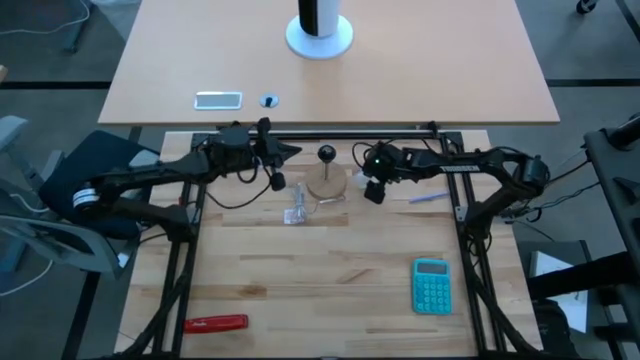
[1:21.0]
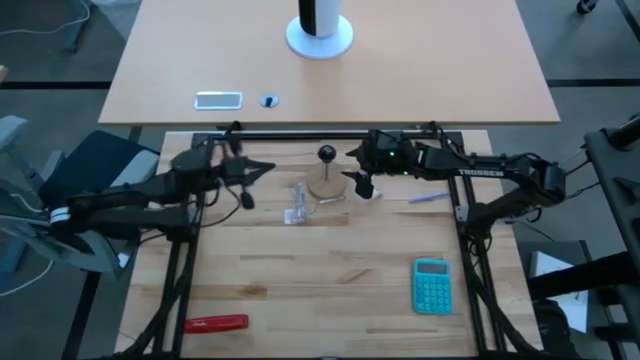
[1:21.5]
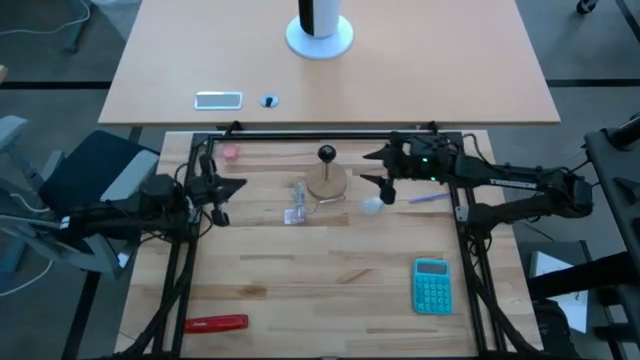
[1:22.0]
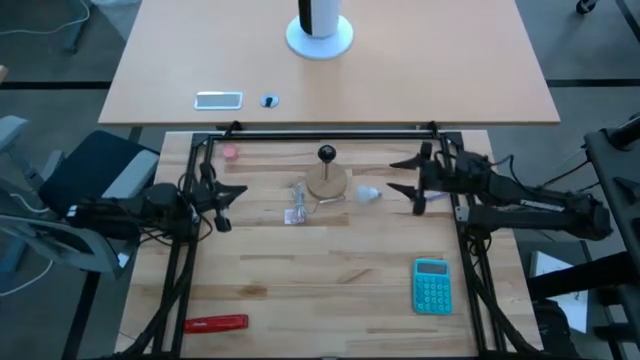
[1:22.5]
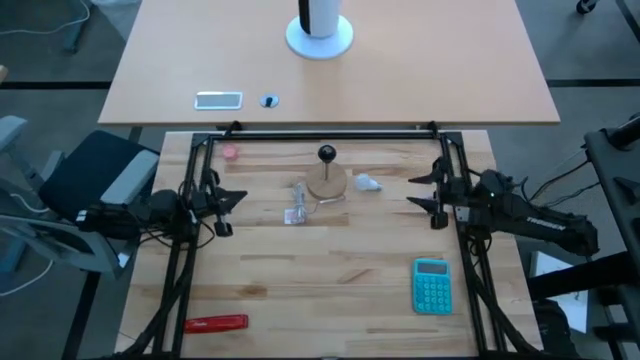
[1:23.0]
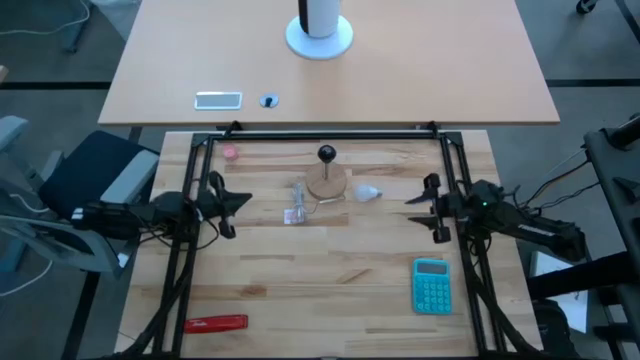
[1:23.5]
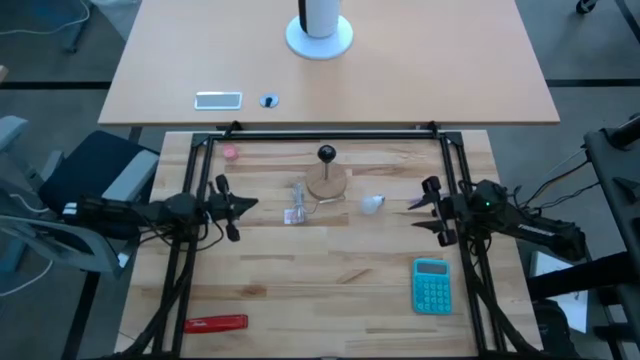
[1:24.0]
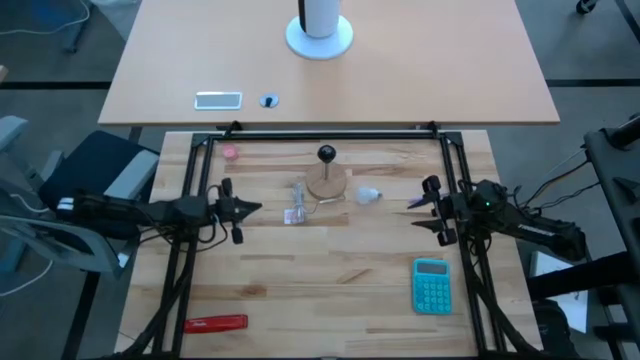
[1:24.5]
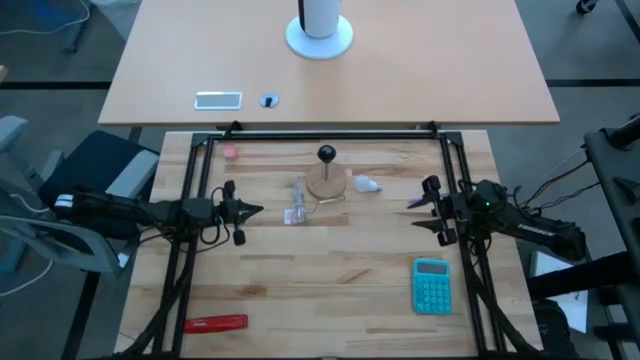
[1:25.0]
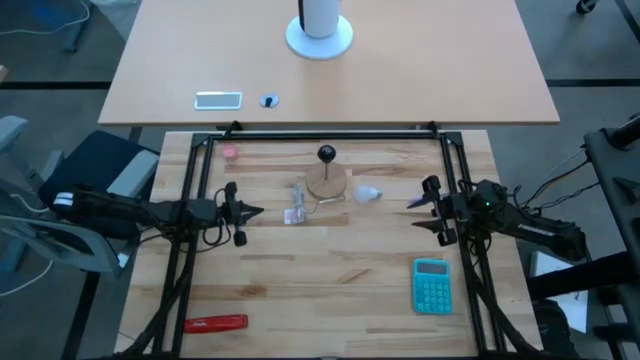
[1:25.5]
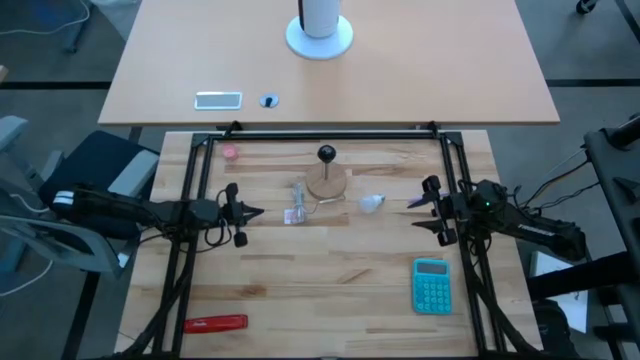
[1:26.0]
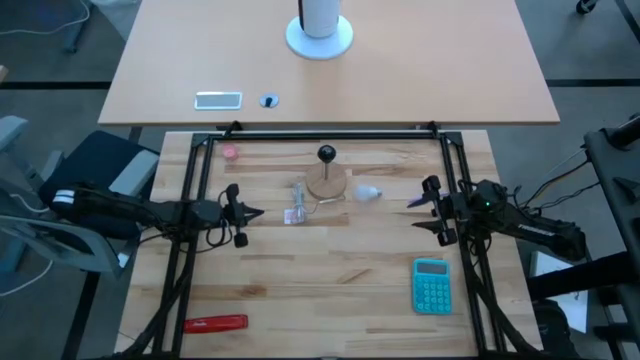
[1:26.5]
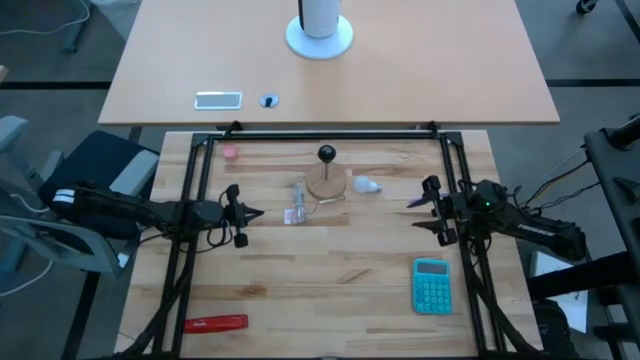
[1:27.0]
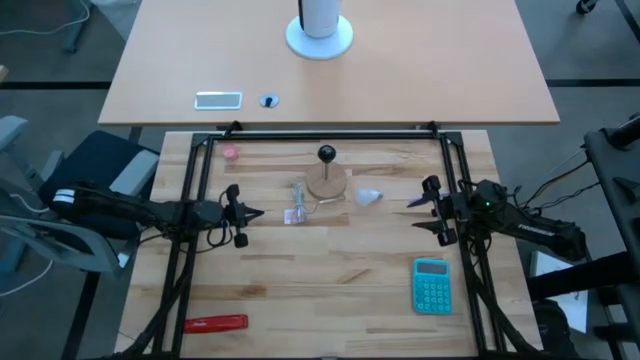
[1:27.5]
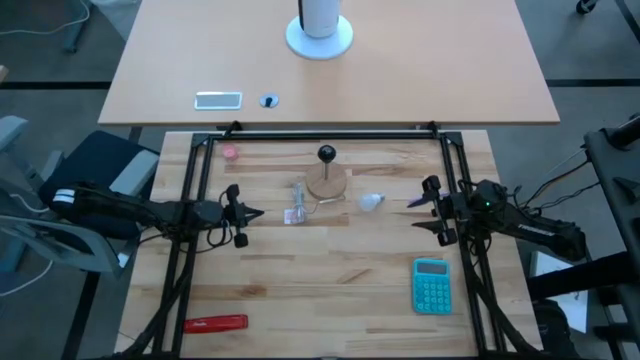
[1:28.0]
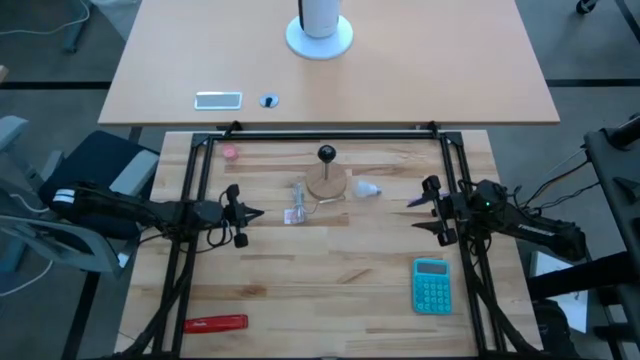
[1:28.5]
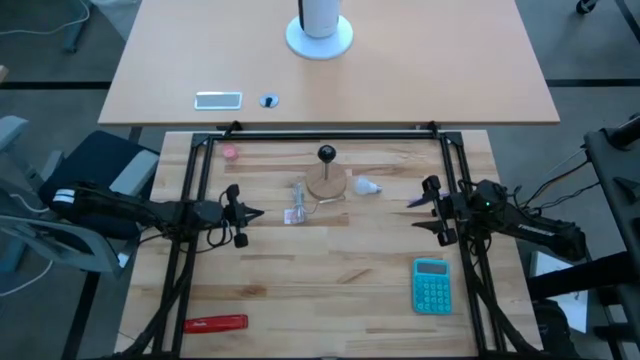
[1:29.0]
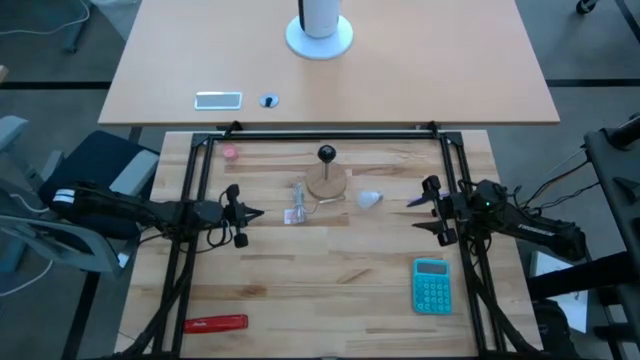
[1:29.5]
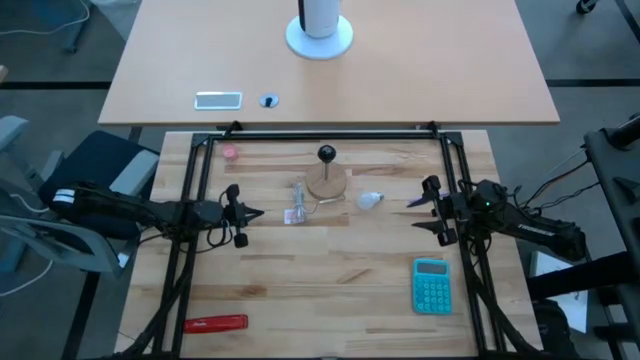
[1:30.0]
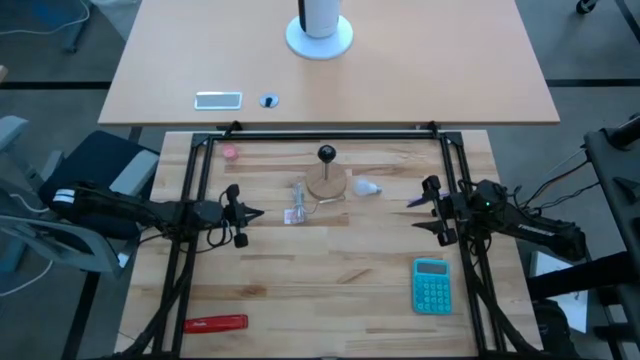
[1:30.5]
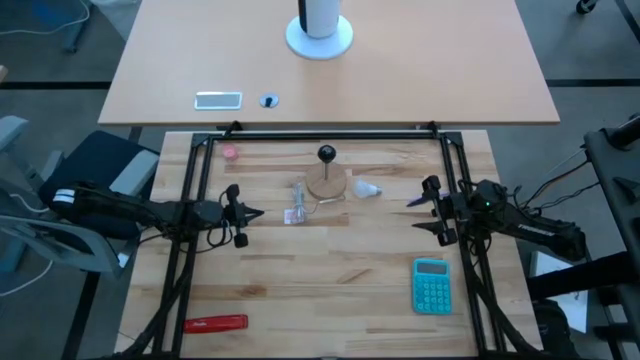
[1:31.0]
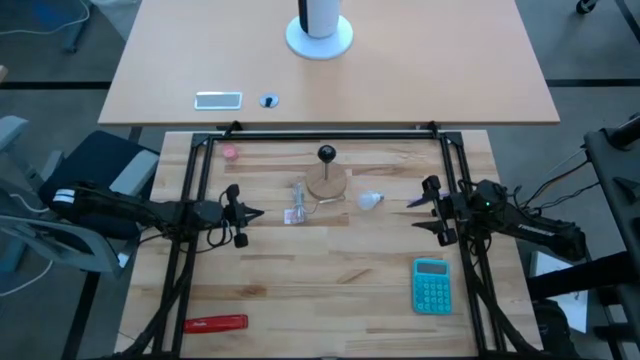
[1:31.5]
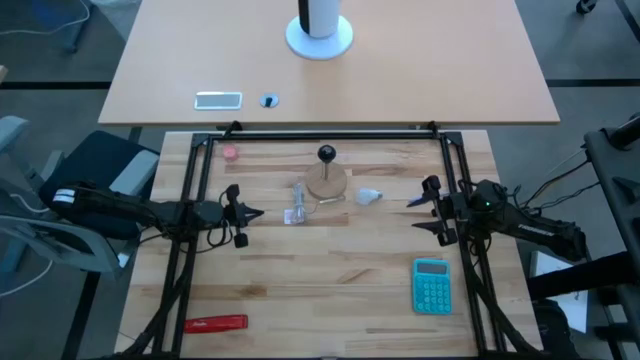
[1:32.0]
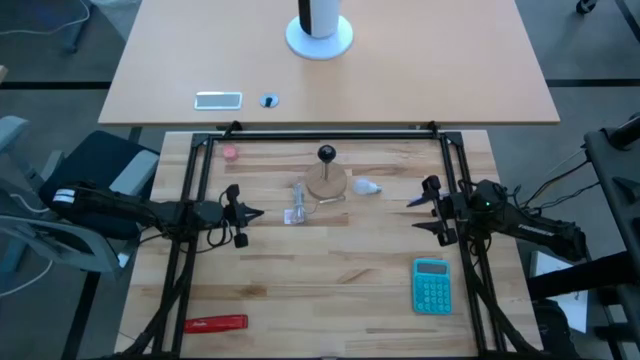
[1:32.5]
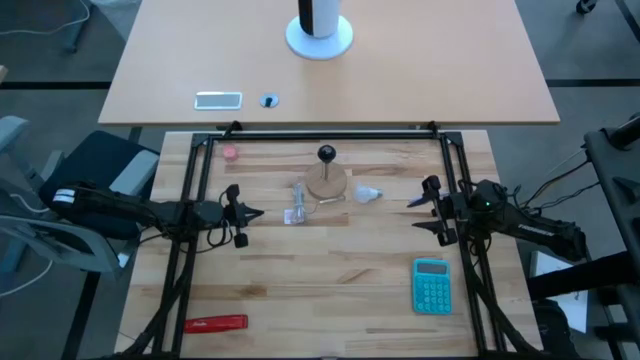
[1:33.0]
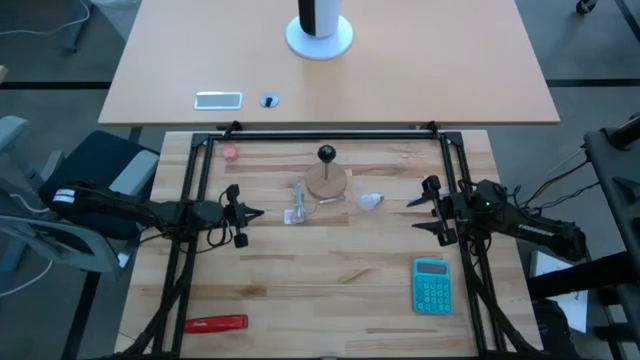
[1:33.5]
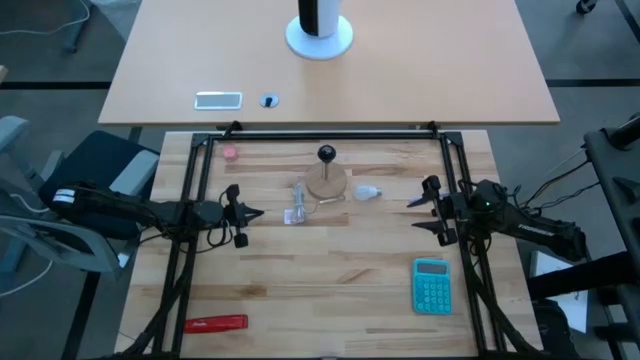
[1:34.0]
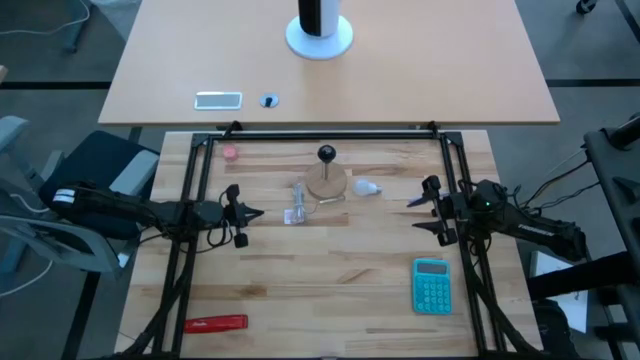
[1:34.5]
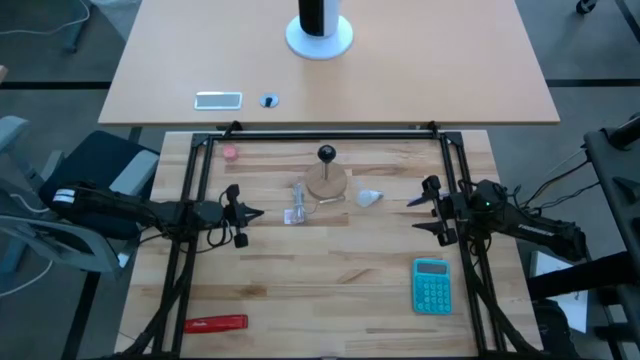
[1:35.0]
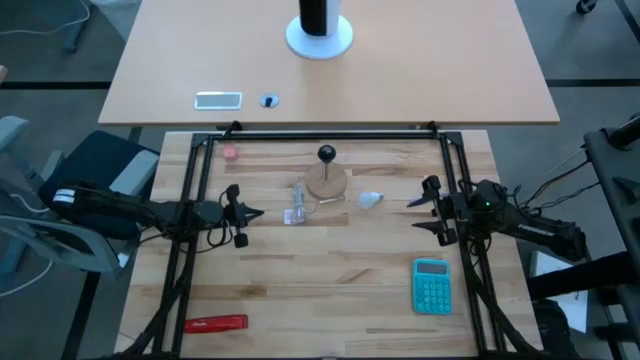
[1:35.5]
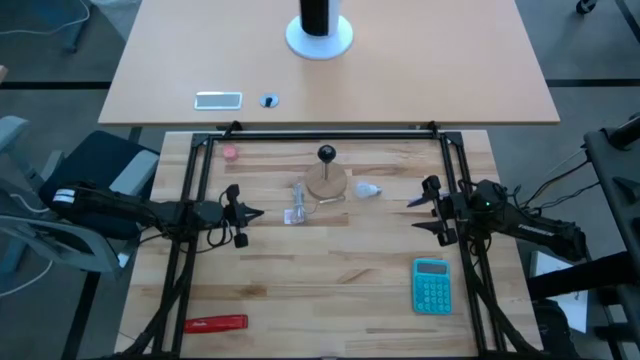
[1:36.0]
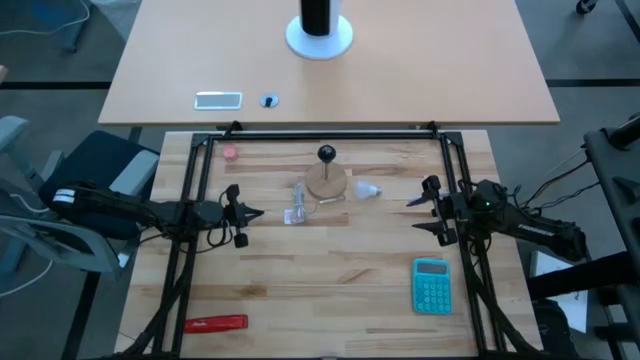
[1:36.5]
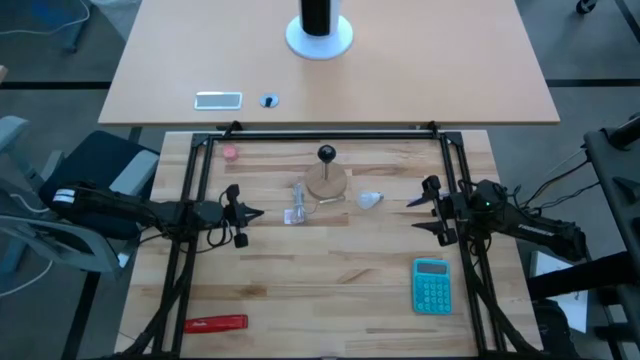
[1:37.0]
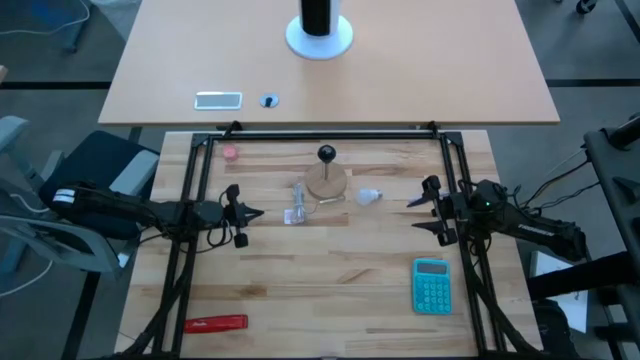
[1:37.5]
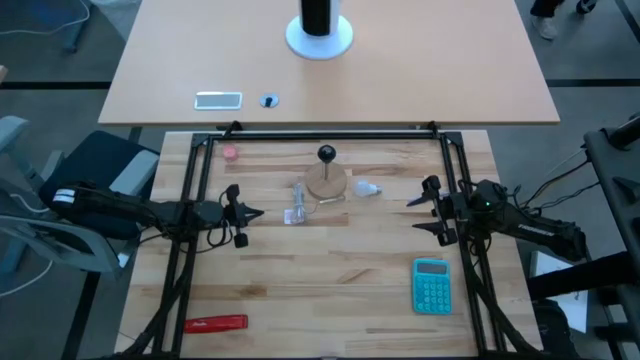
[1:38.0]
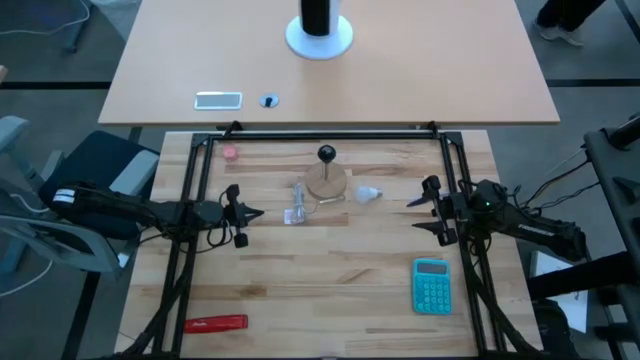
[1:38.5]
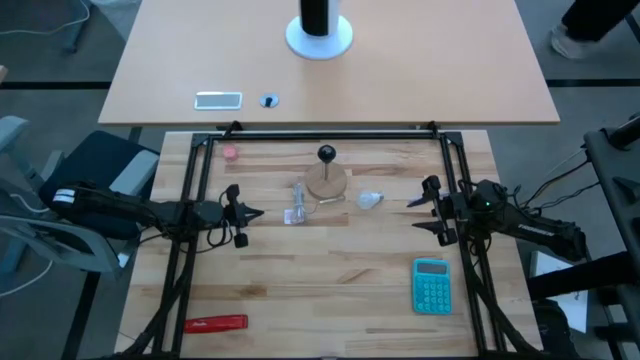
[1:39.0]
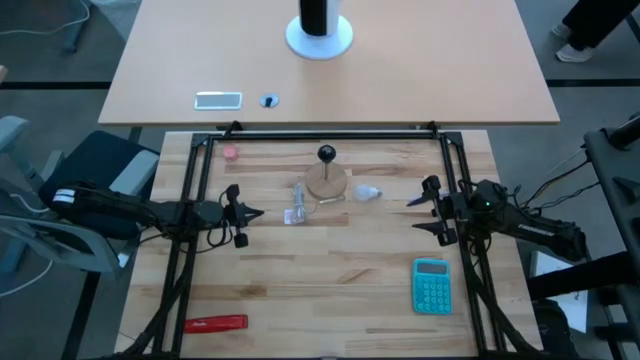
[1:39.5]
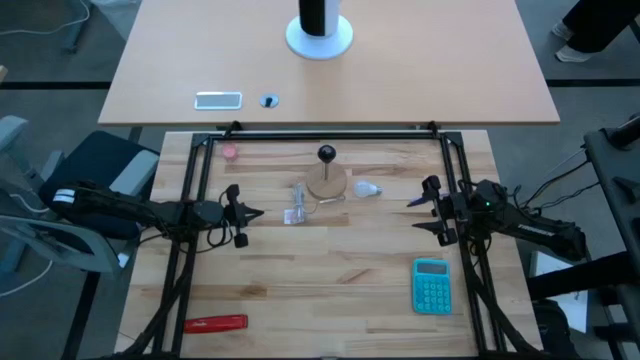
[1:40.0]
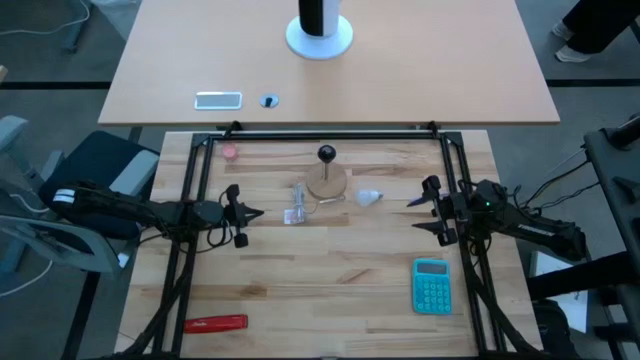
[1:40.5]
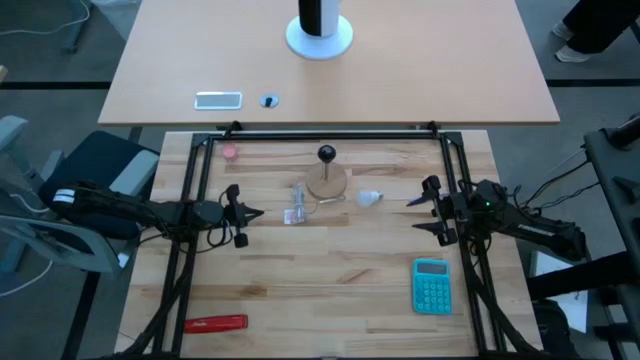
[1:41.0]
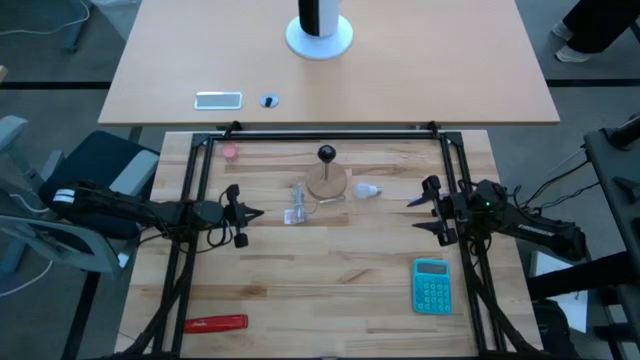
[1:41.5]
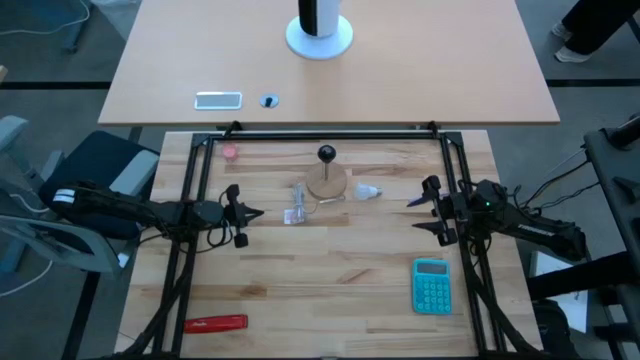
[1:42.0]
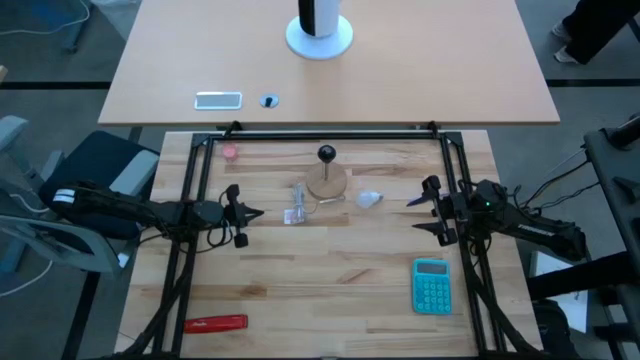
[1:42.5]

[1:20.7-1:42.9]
Task: Screw lightbulb
Return to Home Position
